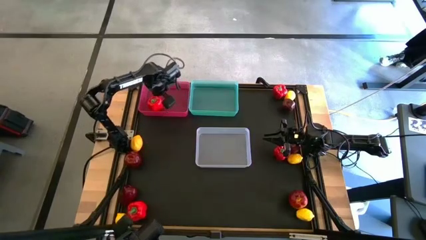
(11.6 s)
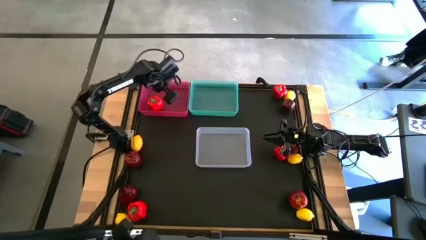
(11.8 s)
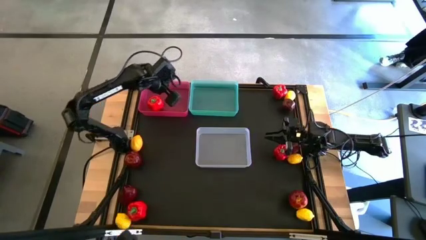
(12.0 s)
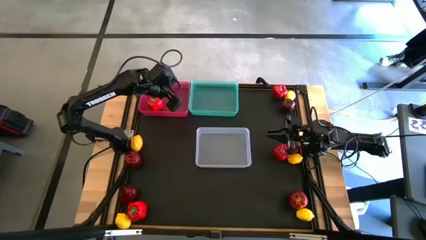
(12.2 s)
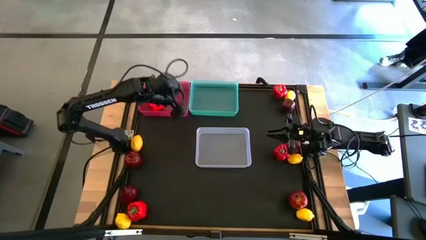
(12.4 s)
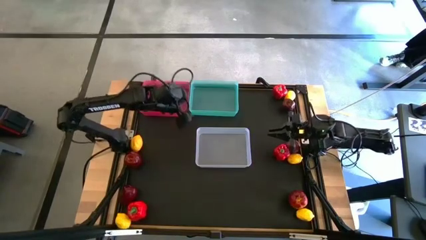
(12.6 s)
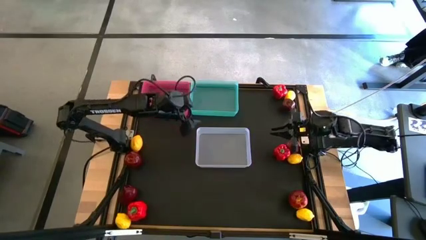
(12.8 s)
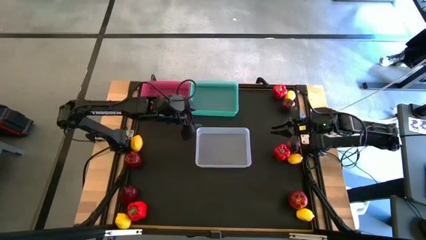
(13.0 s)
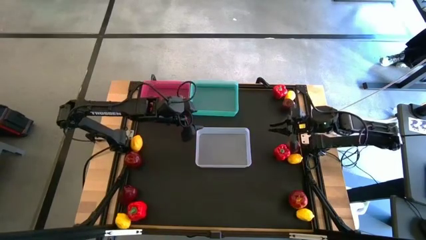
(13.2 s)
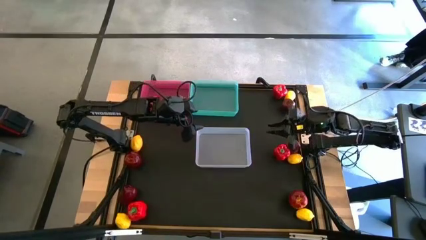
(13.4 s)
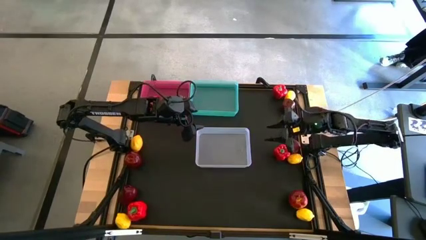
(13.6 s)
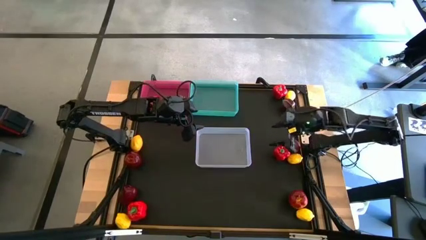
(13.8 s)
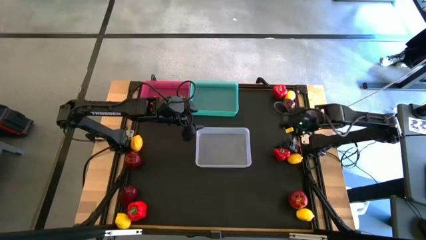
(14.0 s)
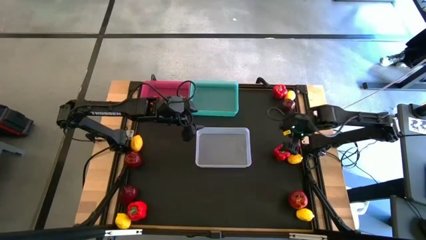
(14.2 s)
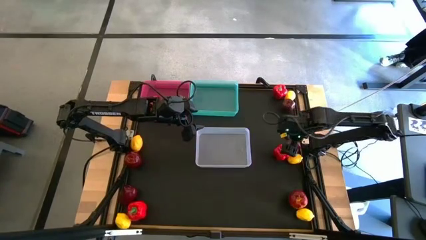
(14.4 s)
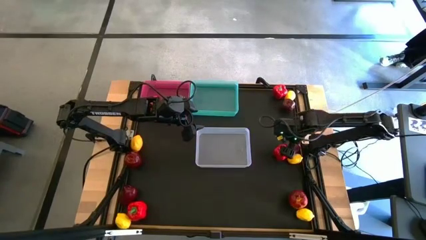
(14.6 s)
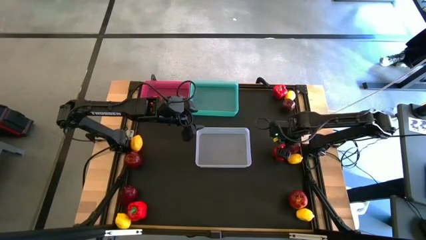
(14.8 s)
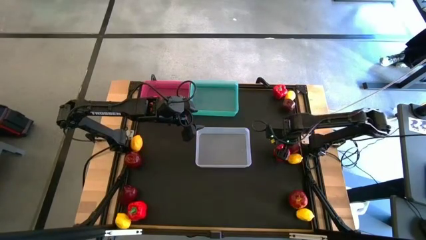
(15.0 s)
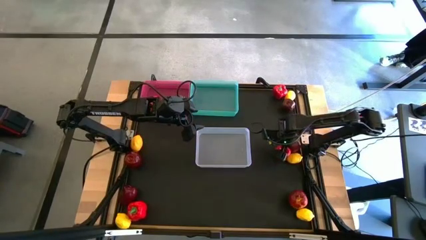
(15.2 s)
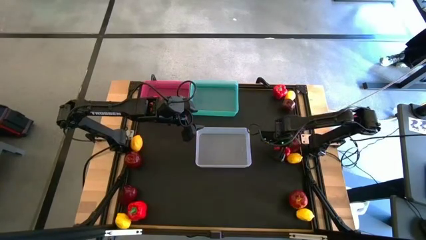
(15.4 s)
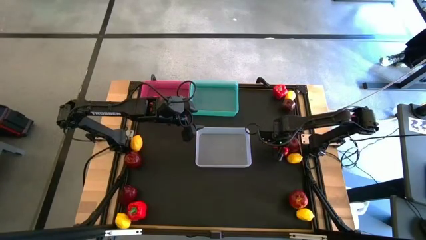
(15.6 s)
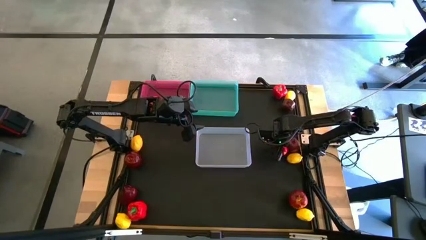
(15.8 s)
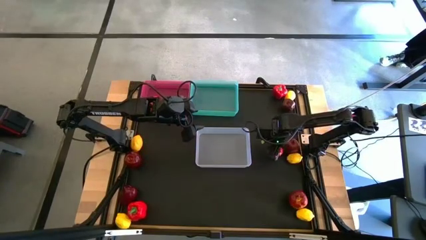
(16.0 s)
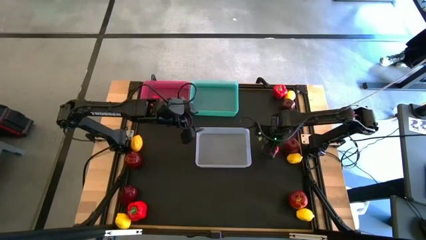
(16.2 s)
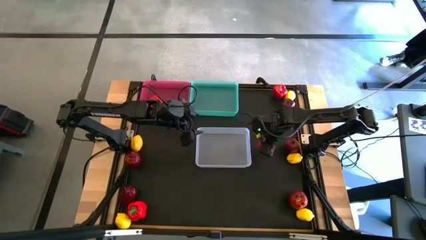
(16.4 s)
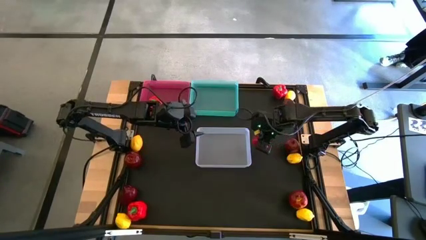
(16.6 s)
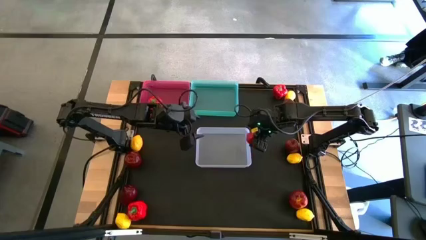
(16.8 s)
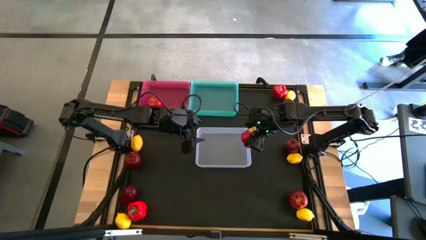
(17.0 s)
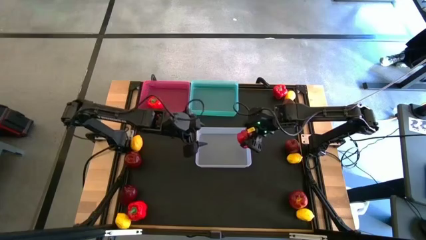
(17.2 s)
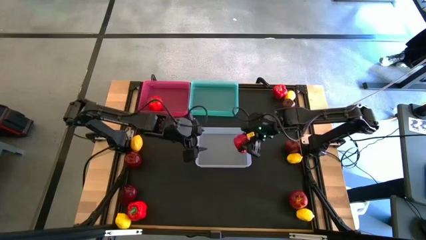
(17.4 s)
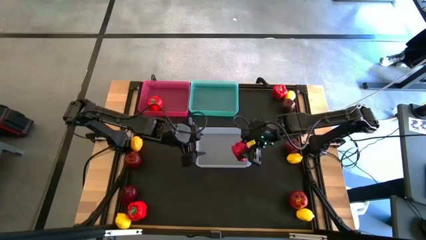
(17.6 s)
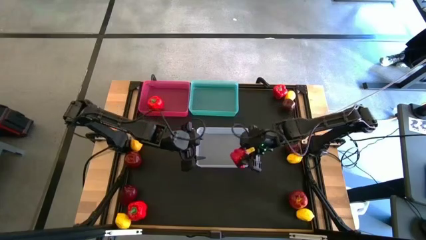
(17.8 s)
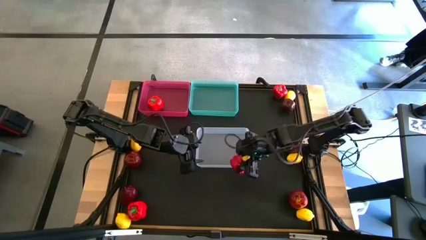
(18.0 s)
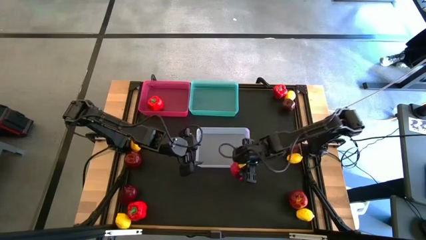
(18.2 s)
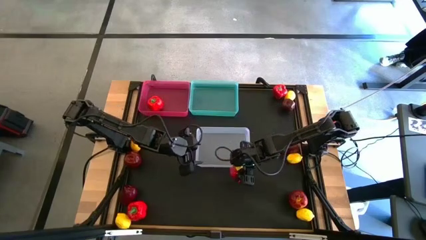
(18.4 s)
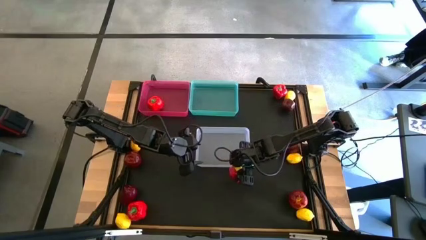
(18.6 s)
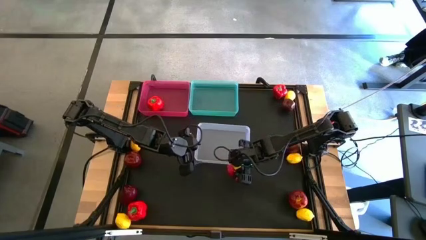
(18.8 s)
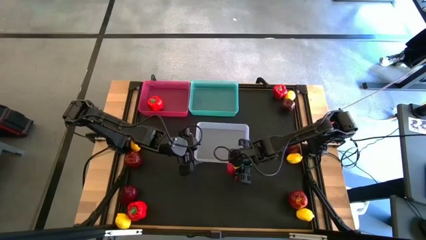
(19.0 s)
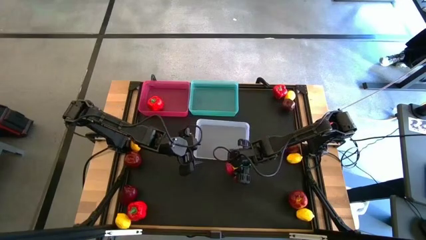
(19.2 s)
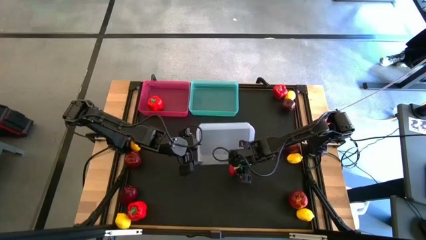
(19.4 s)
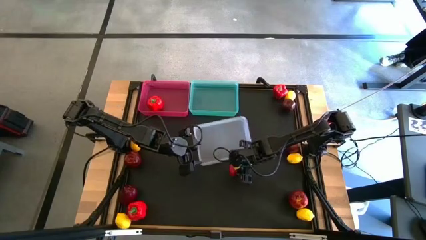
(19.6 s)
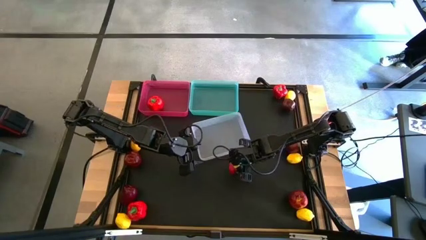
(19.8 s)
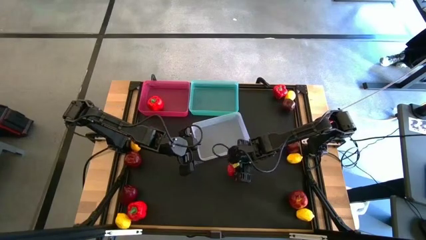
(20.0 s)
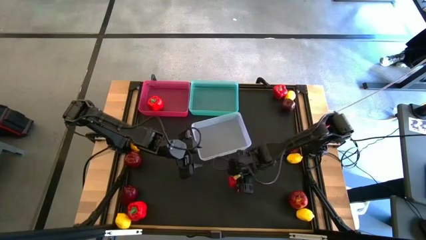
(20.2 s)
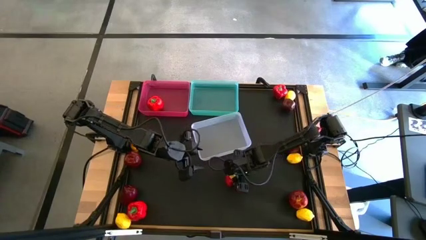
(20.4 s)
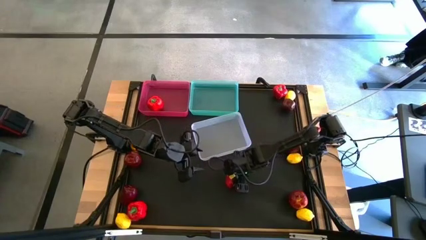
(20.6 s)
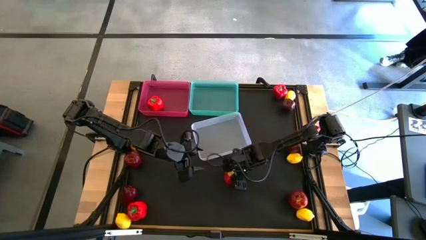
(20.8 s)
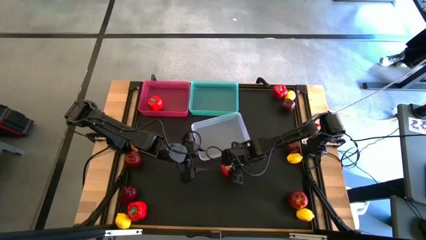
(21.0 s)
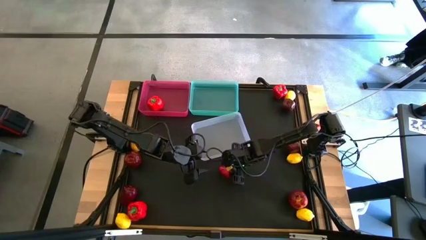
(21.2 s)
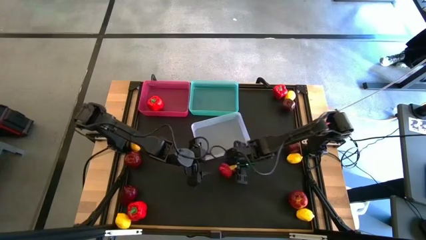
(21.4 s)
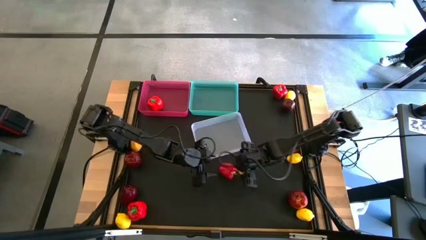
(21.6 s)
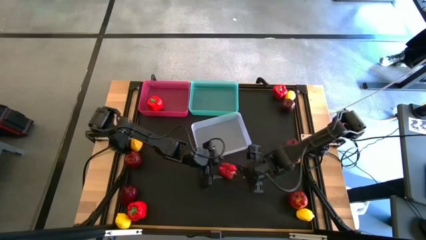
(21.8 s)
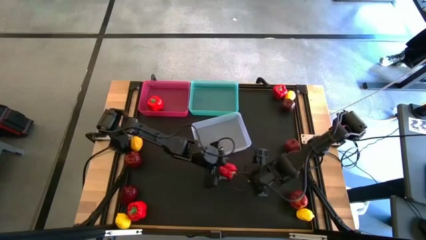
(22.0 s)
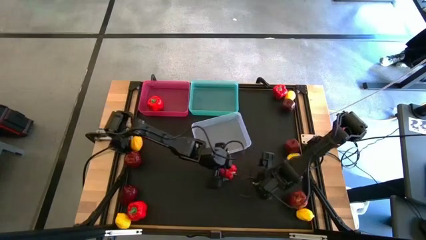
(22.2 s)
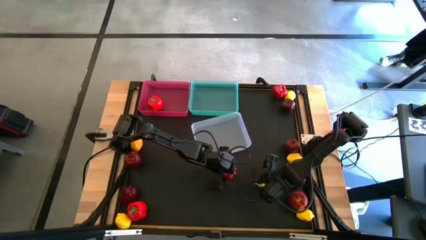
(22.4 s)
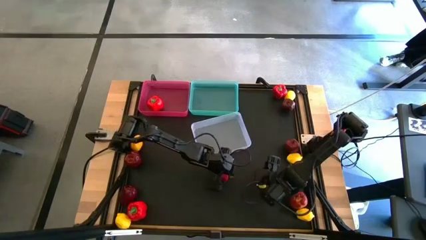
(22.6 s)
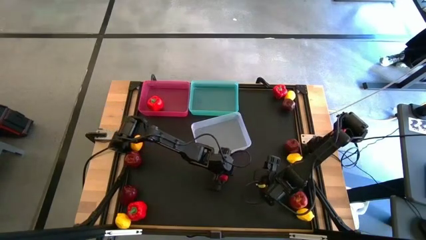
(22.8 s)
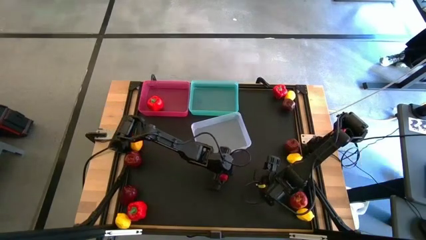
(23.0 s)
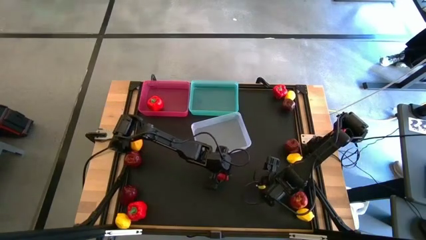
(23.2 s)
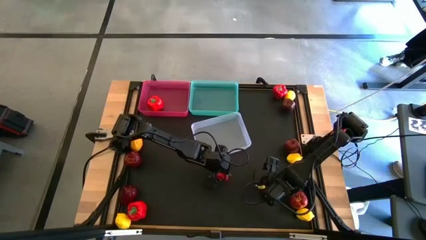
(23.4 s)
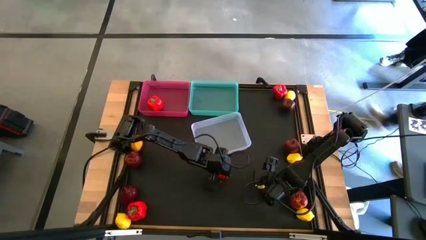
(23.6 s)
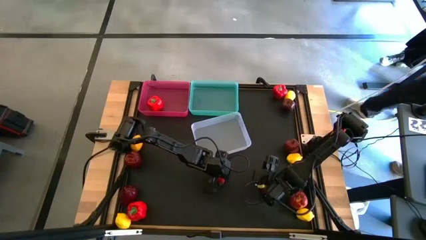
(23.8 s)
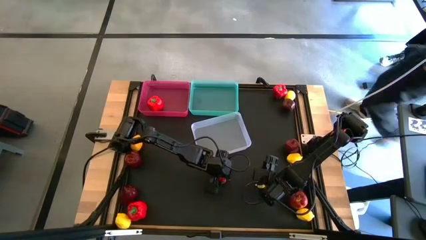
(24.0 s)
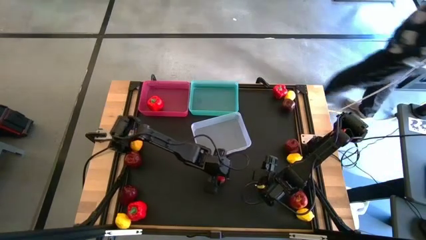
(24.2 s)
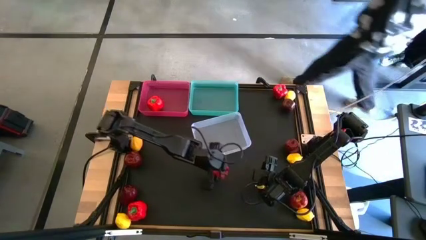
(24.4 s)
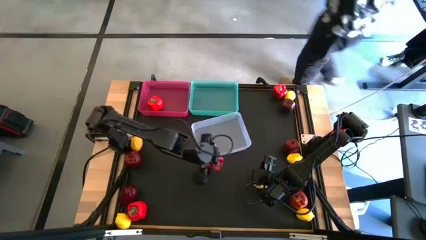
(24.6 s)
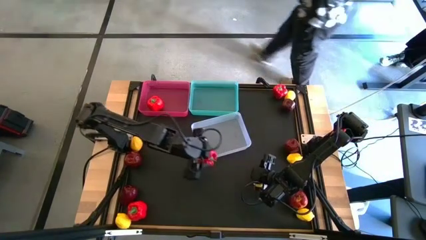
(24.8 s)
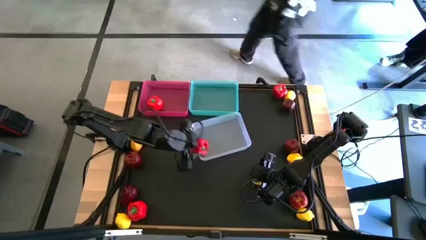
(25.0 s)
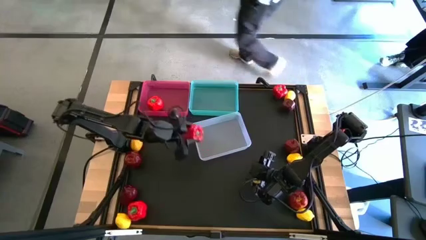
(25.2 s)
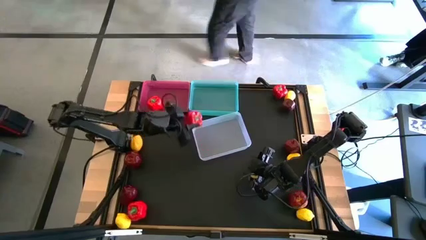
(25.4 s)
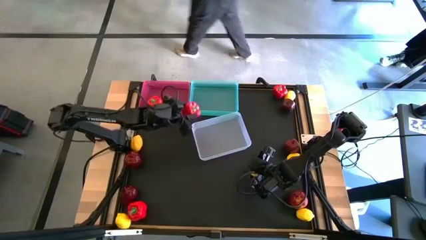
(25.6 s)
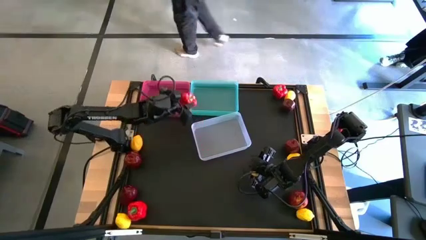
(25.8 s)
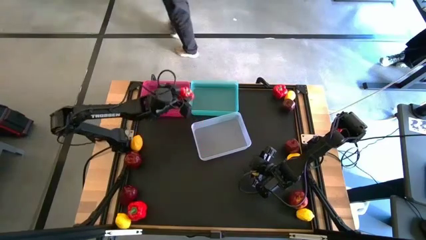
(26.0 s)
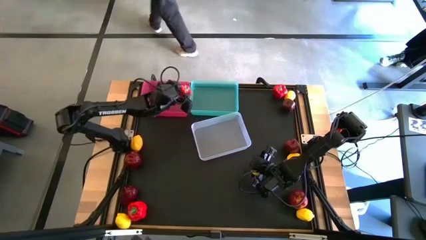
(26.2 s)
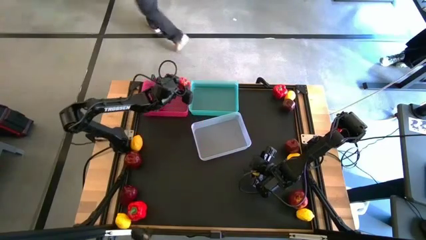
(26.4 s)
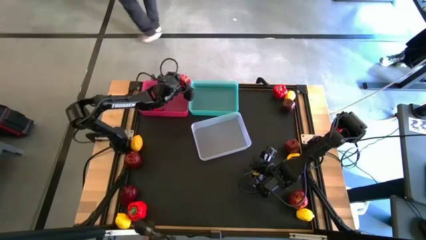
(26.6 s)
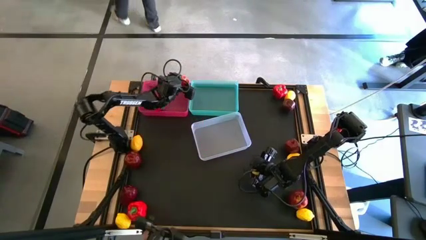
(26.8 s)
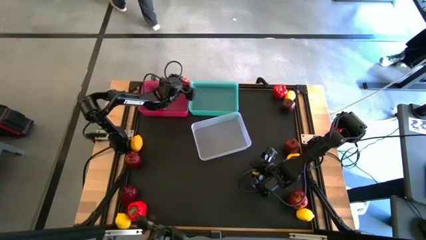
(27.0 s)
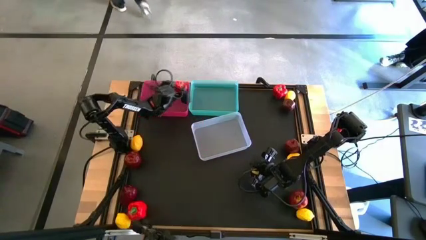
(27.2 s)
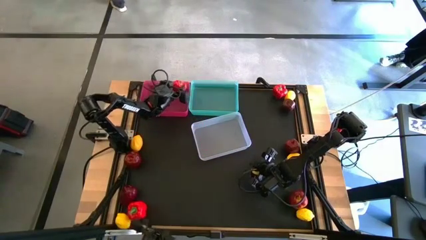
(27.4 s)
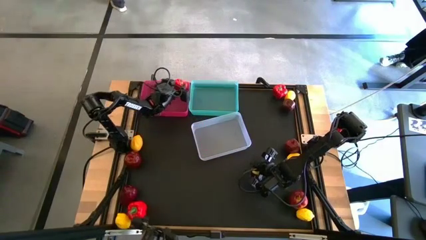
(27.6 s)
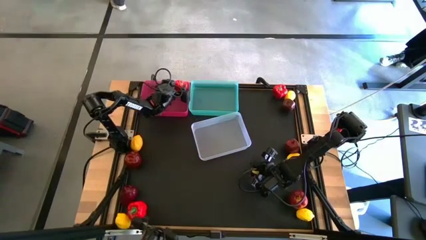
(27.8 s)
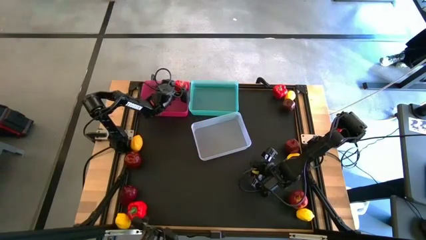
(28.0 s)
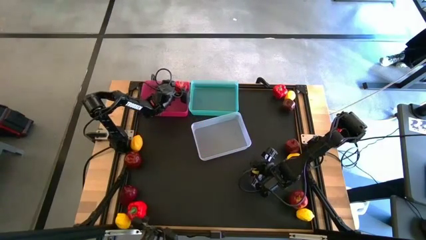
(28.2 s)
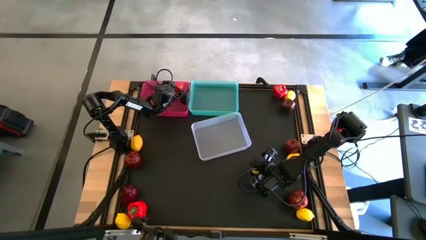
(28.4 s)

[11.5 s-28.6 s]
Task: Sort produce into baskets
Put the red bell pepper into the red bin
